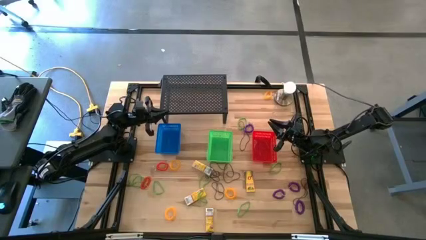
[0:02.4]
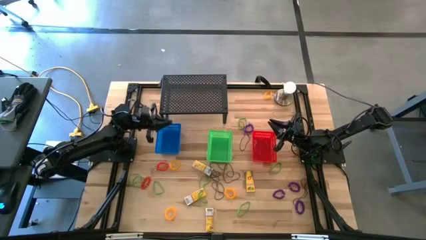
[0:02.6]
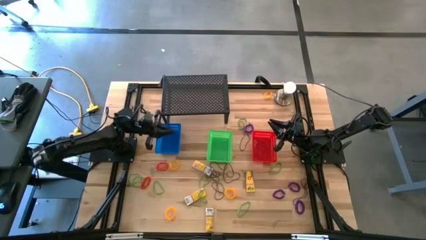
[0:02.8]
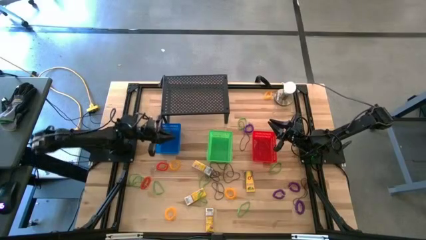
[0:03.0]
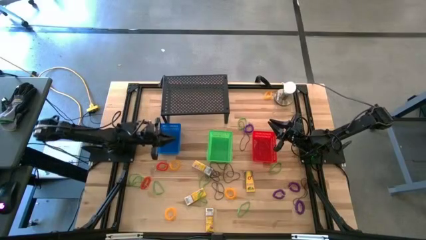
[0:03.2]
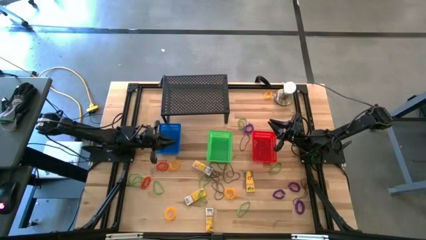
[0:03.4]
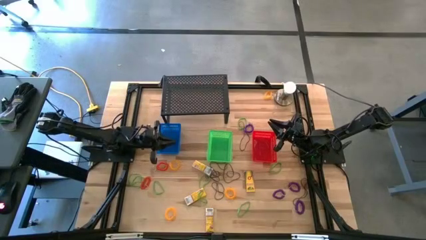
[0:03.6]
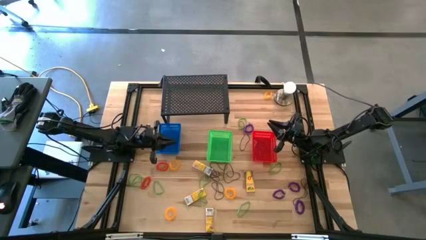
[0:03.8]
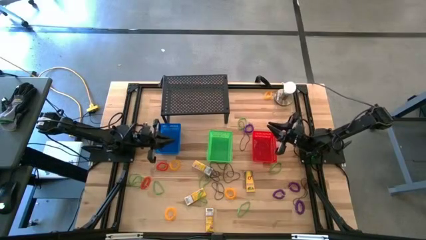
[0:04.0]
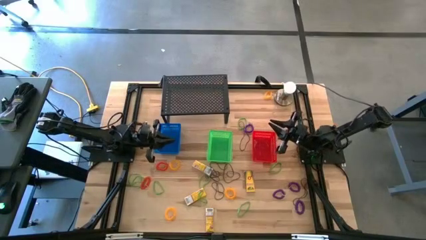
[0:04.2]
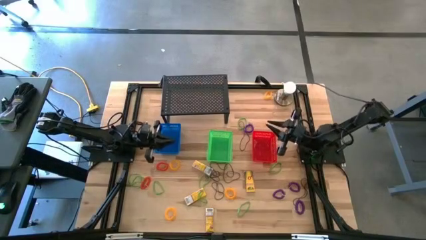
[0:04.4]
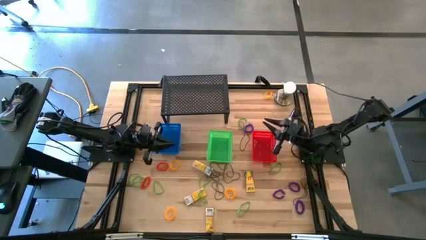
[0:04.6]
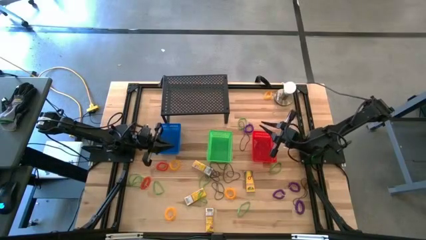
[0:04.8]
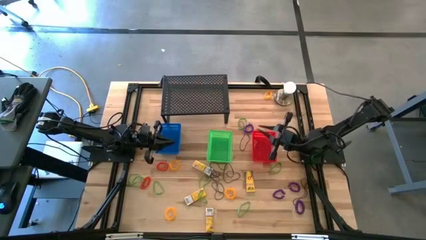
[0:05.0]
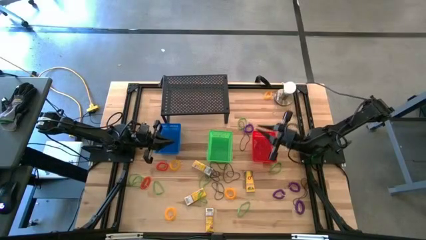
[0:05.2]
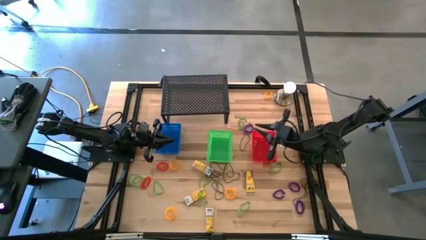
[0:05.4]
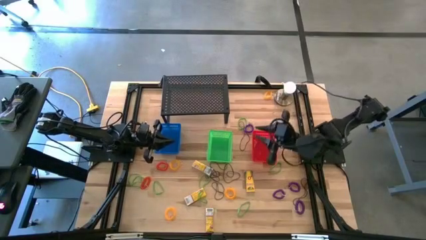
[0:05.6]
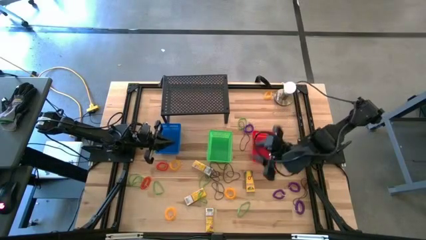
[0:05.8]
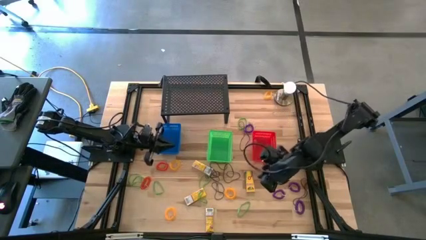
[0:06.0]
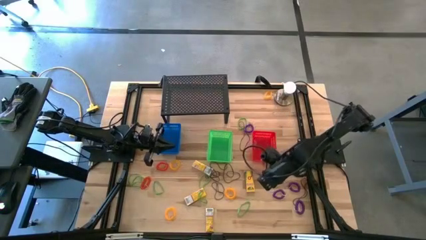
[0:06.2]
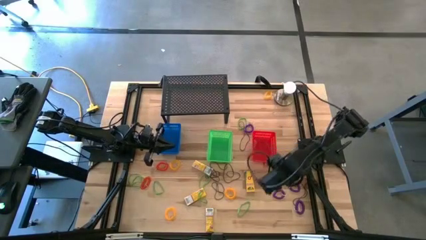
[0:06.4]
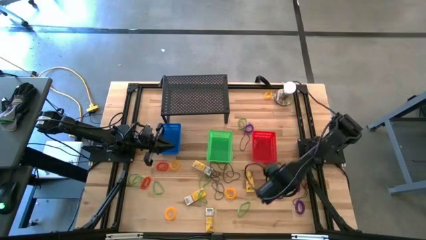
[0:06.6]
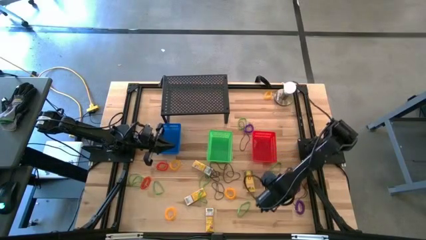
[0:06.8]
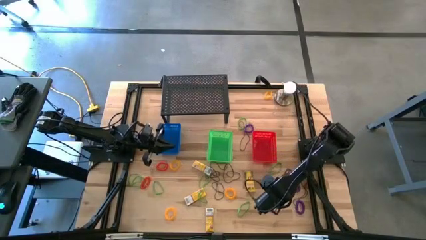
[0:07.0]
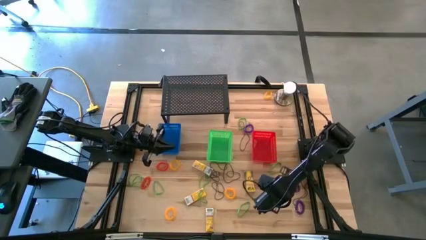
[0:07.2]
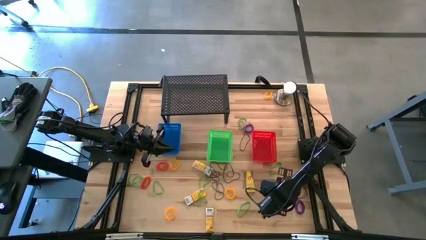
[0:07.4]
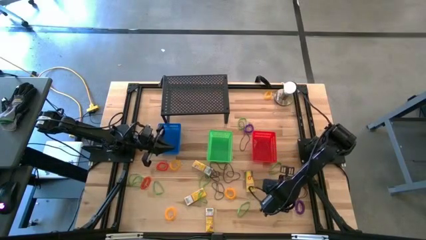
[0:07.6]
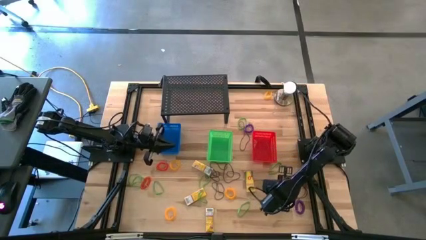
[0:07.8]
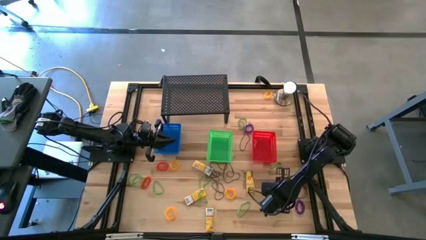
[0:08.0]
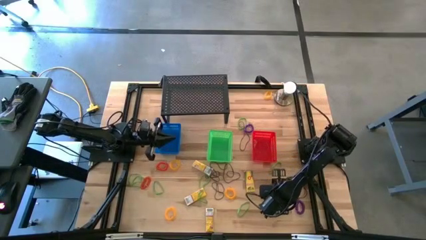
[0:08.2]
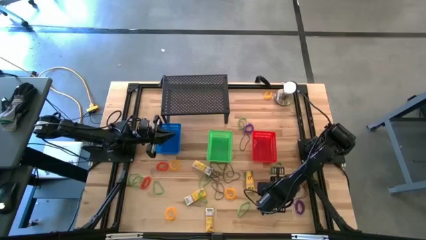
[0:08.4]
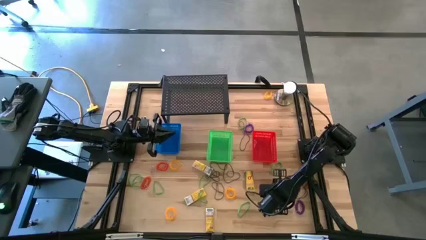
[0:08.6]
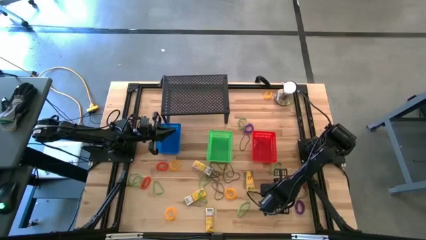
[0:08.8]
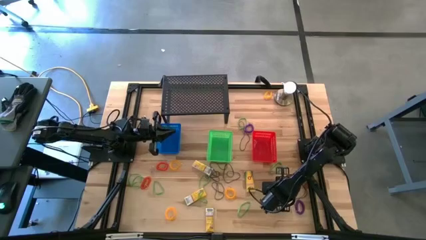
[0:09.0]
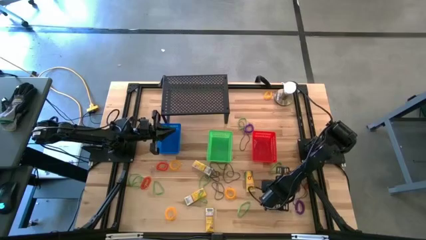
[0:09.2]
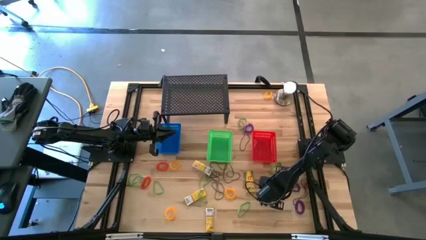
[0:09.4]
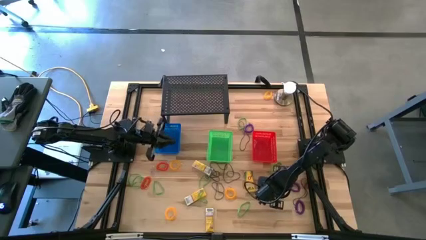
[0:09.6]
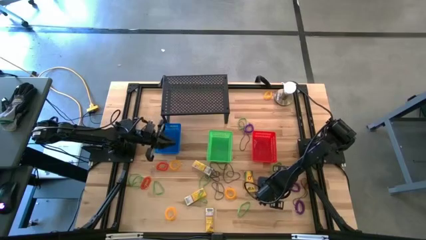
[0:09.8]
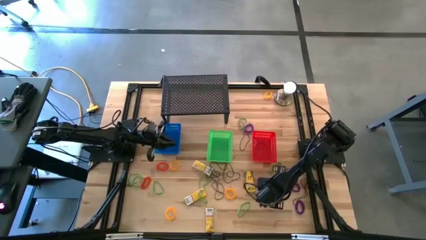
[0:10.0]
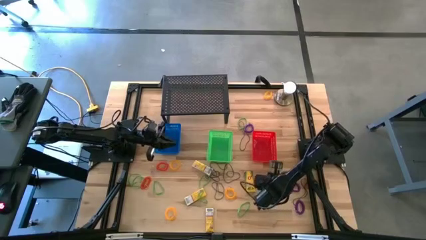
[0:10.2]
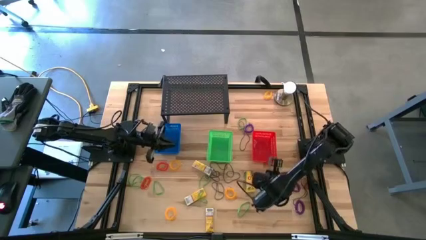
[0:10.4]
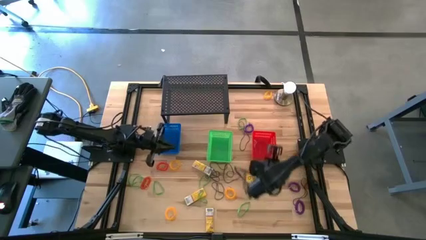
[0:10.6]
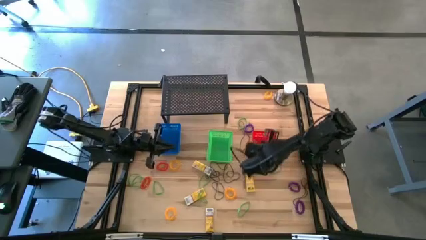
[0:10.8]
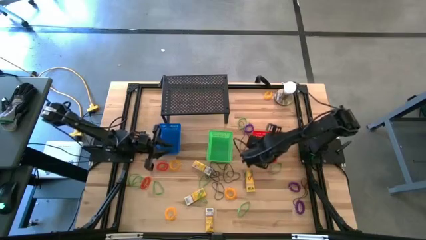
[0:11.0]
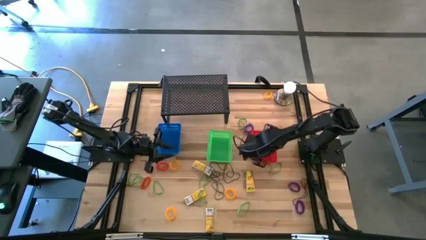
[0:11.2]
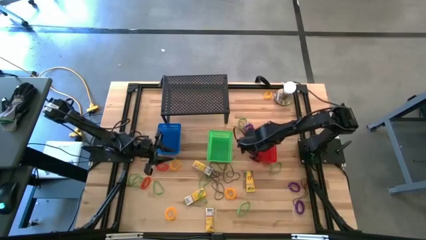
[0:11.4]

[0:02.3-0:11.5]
Task: Pick & Place Office Desk Supplies
Put the violet spring keychain into the red bin

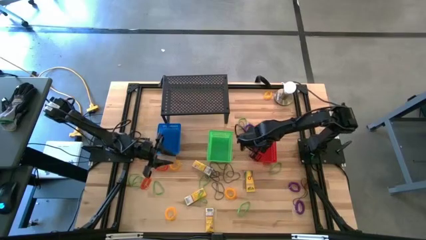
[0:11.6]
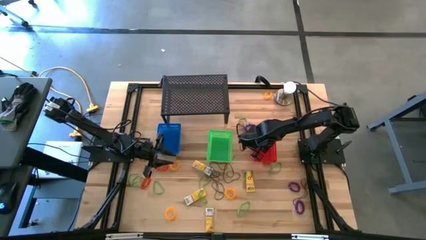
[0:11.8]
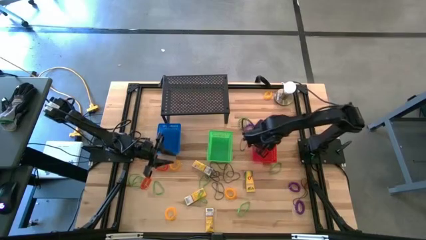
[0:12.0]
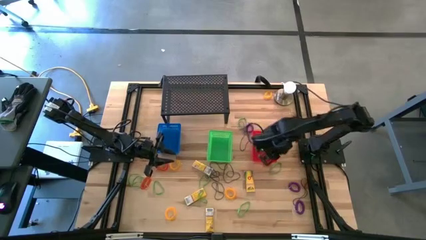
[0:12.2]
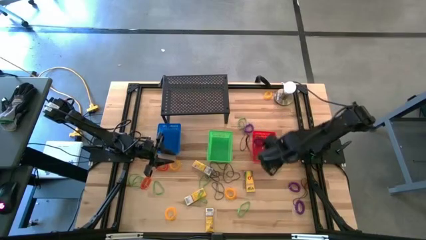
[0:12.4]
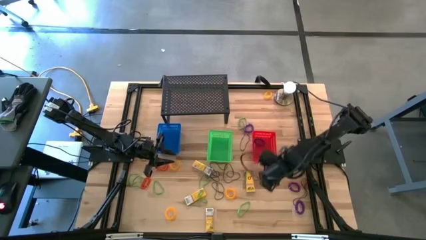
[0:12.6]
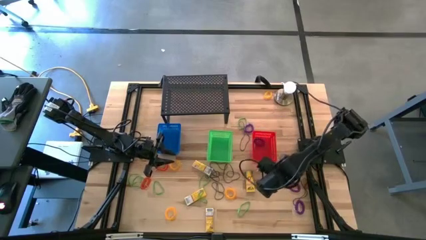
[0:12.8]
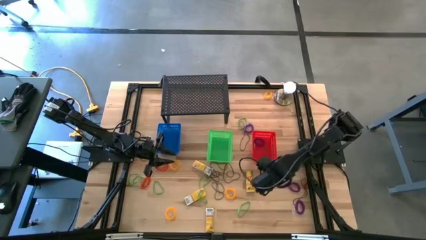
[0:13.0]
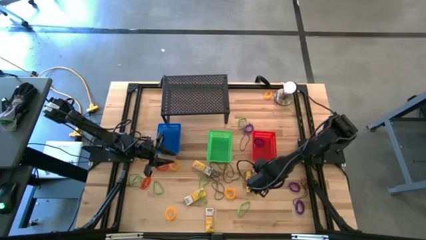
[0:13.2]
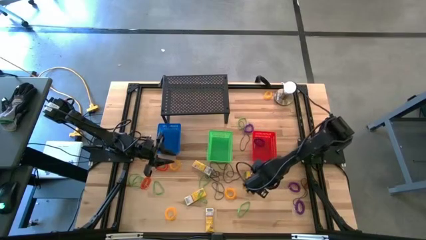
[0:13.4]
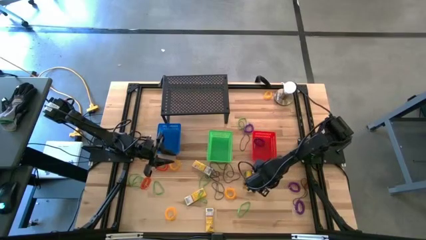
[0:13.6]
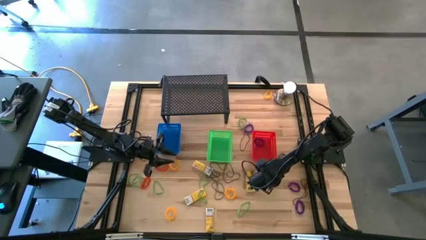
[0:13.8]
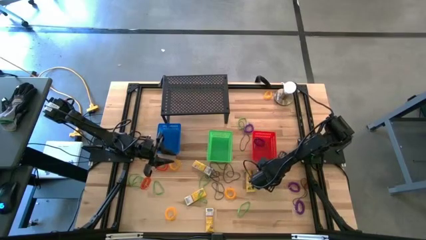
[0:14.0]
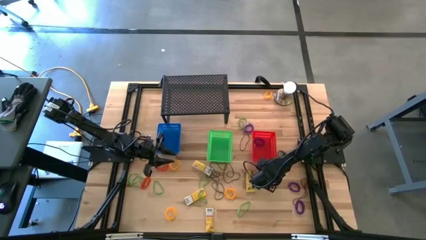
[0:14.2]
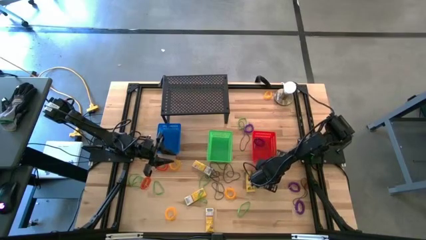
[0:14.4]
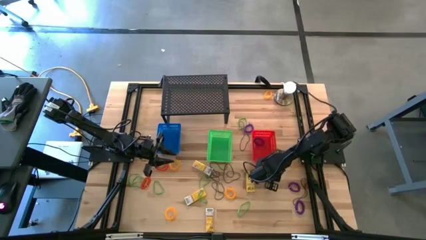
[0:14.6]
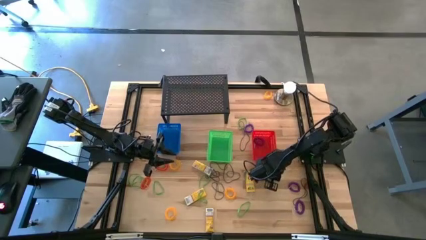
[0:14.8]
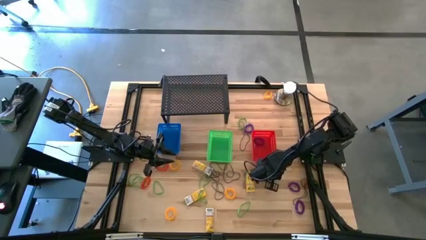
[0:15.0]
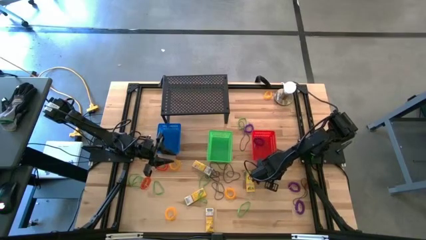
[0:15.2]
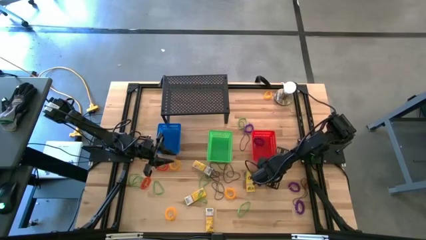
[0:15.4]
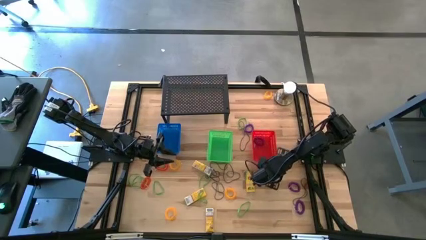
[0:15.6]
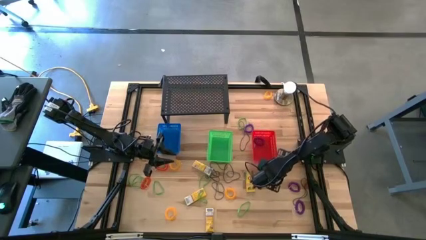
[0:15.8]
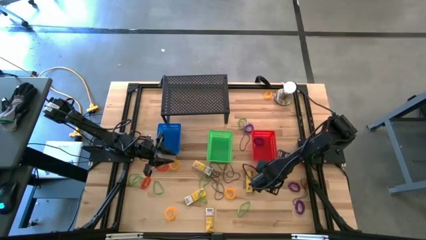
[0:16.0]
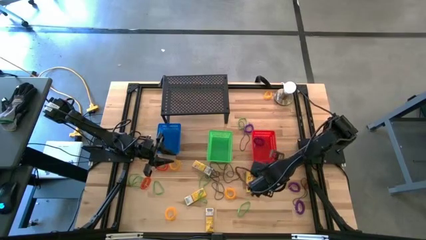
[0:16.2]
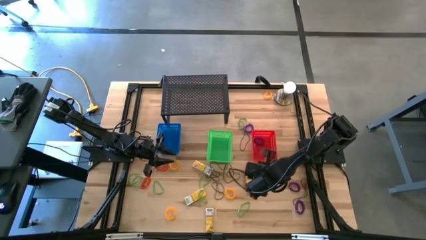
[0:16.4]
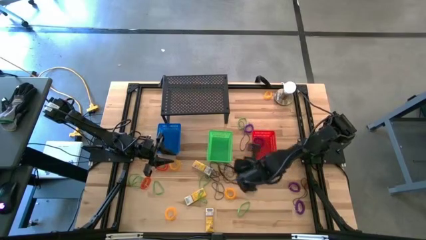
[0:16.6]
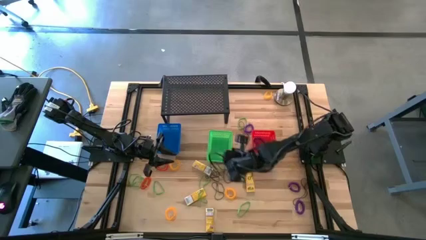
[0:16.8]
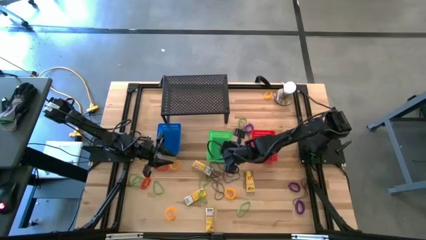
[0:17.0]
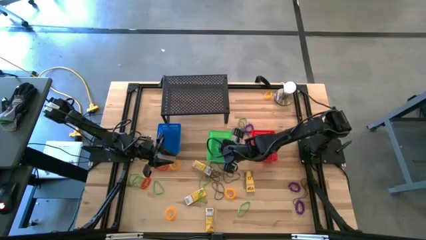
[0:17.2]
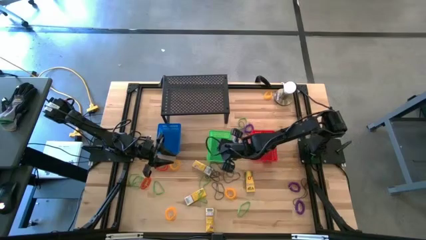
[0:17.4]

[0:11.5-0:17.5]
Put the green rubber band into the green bin
